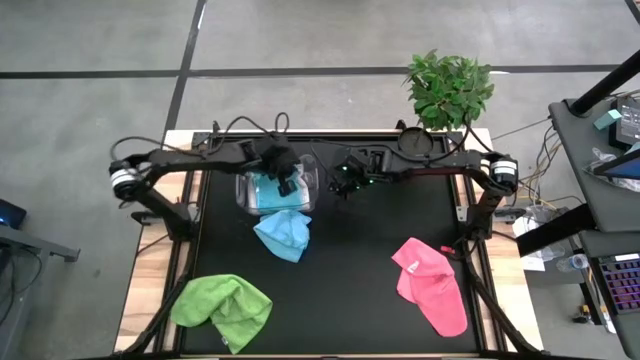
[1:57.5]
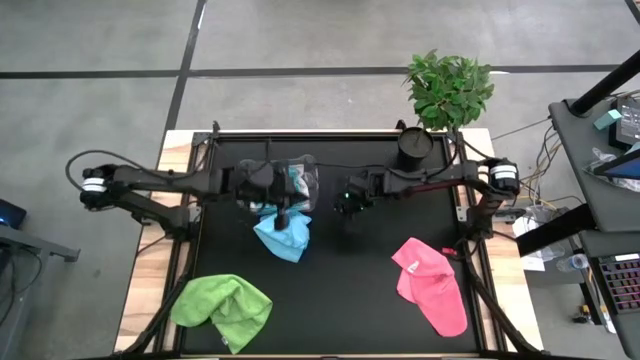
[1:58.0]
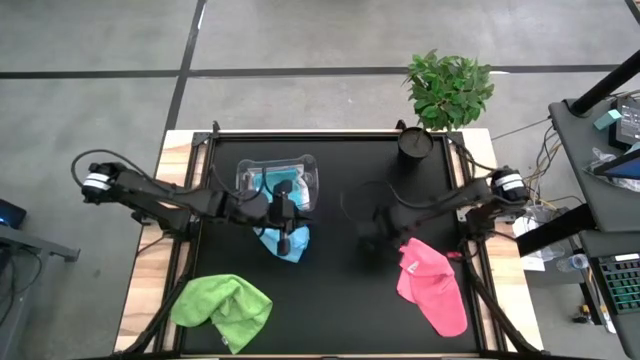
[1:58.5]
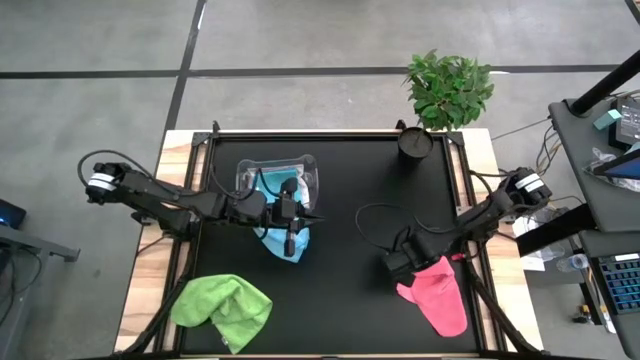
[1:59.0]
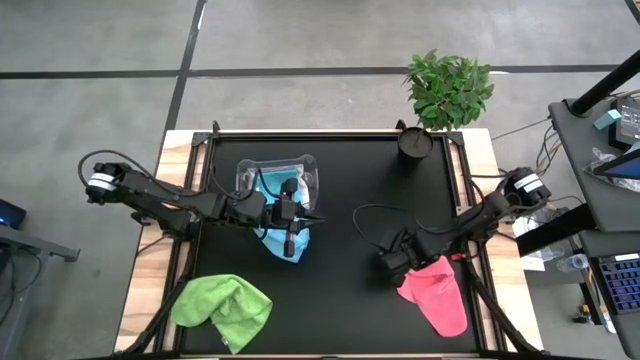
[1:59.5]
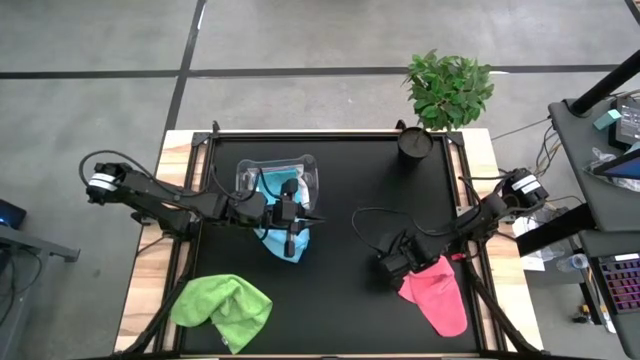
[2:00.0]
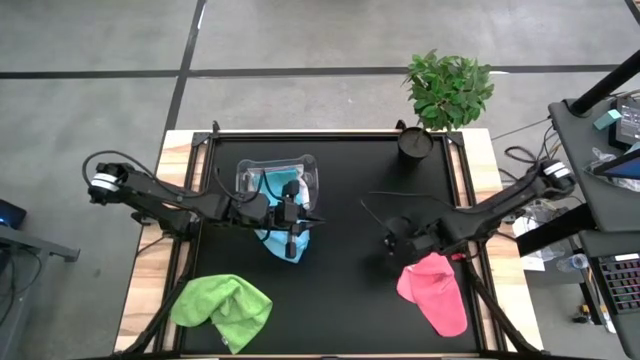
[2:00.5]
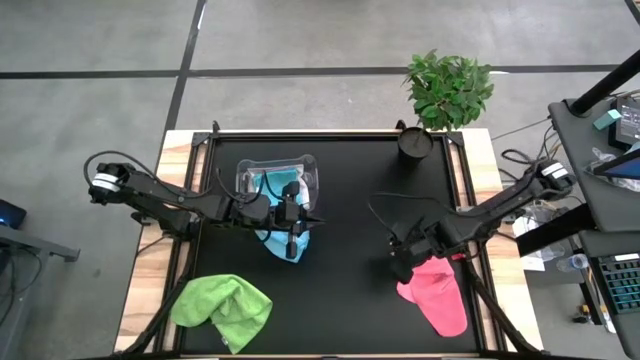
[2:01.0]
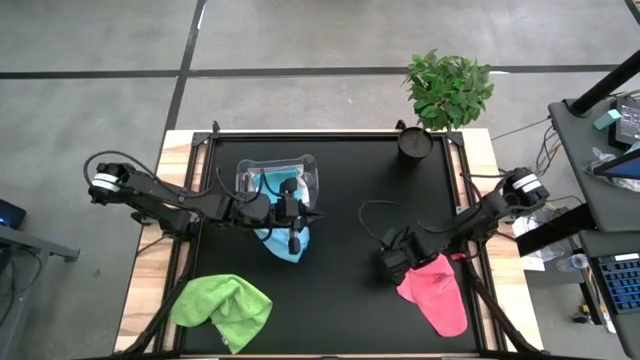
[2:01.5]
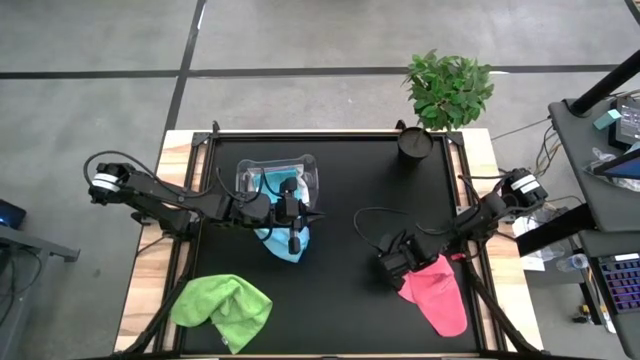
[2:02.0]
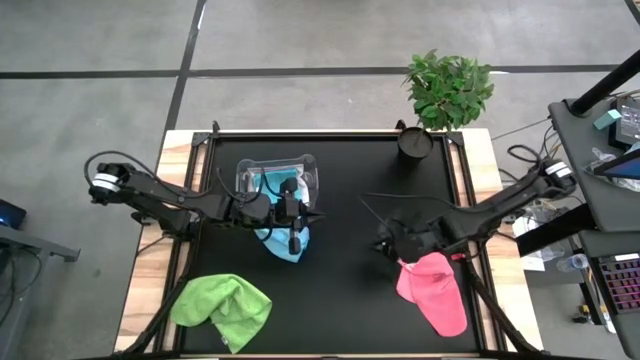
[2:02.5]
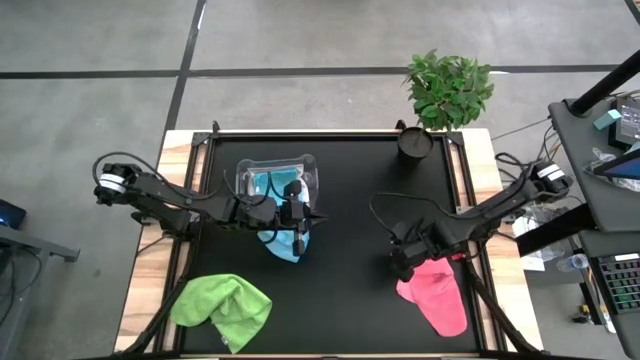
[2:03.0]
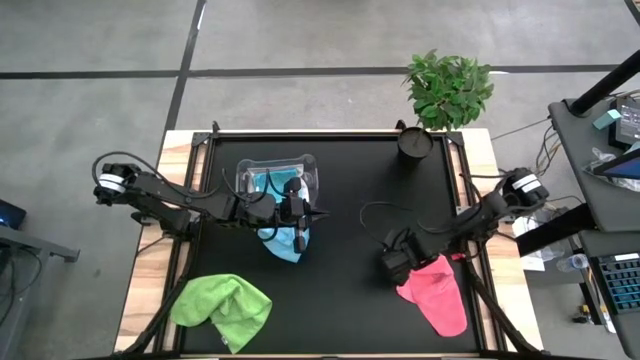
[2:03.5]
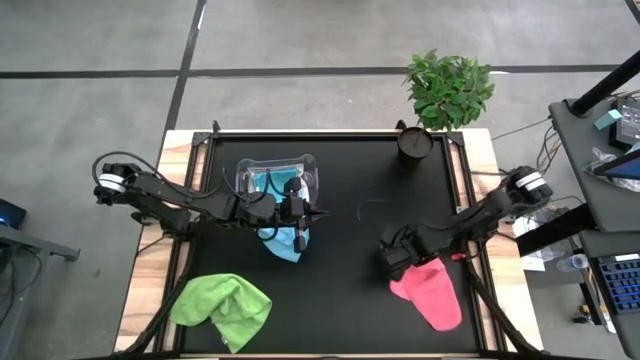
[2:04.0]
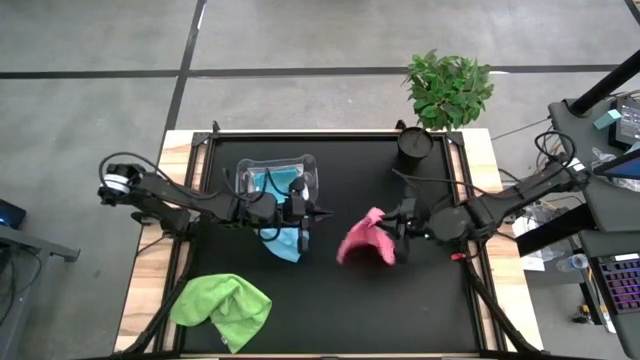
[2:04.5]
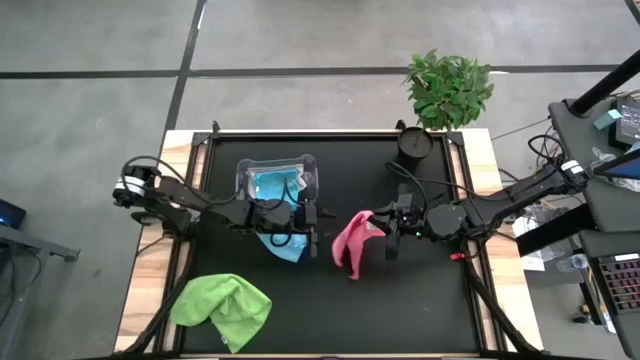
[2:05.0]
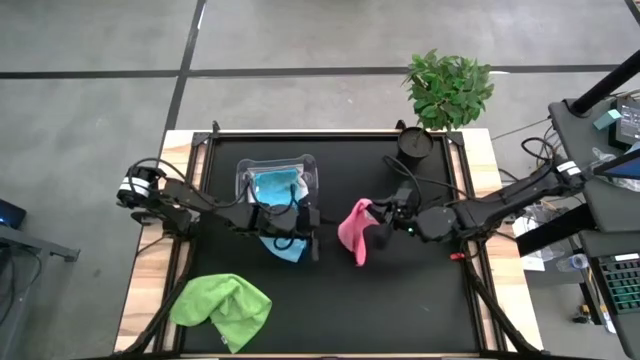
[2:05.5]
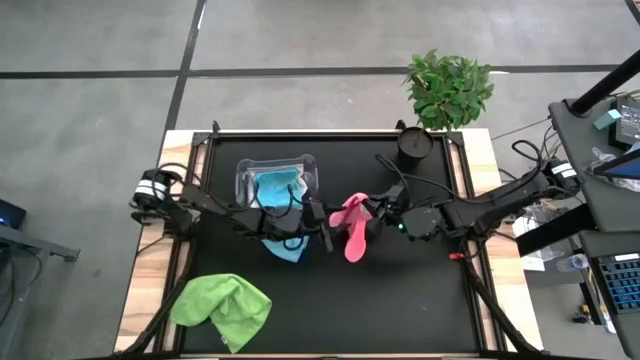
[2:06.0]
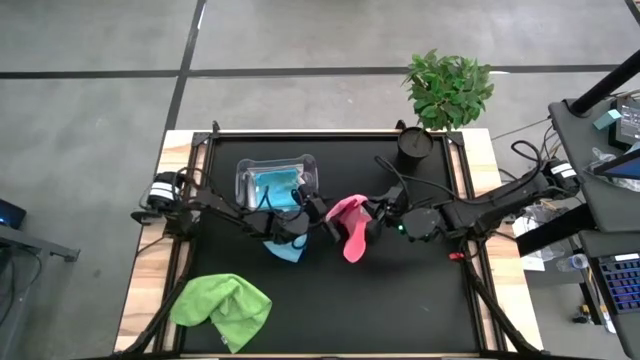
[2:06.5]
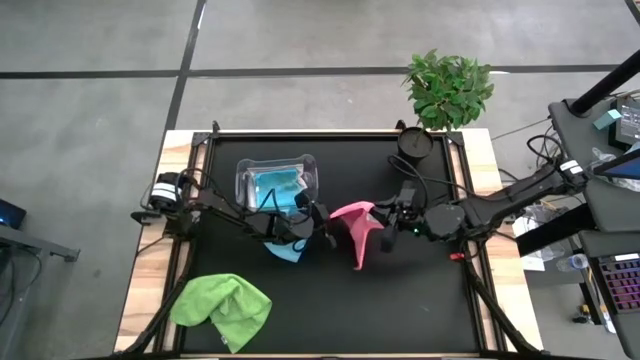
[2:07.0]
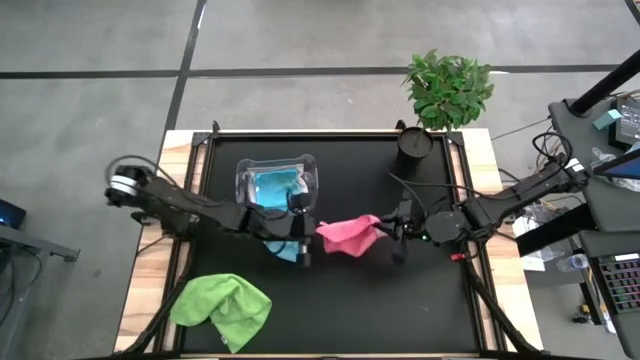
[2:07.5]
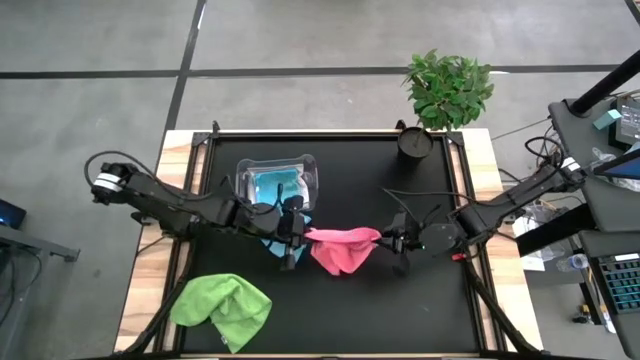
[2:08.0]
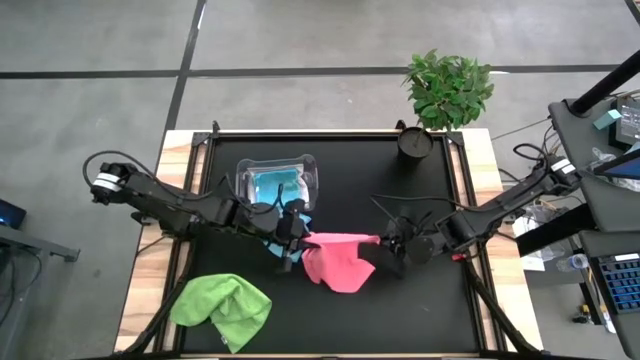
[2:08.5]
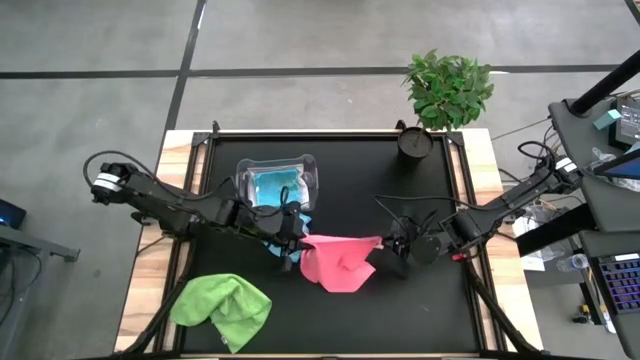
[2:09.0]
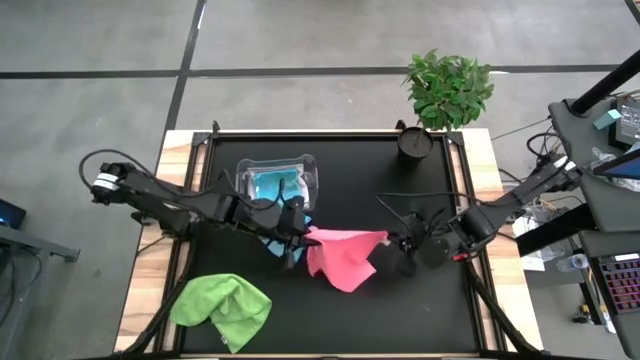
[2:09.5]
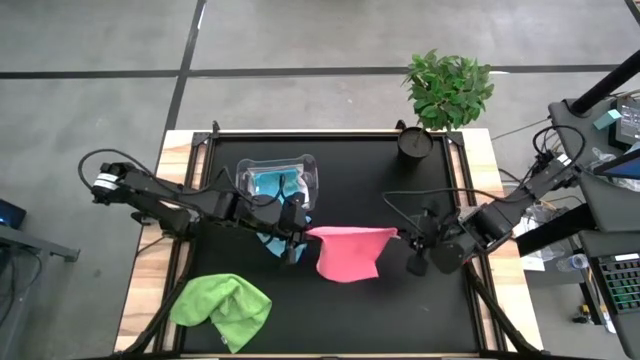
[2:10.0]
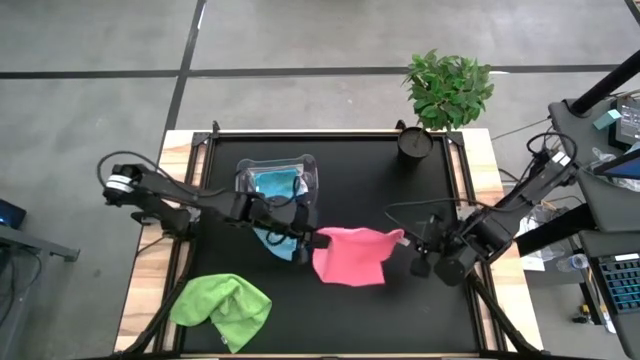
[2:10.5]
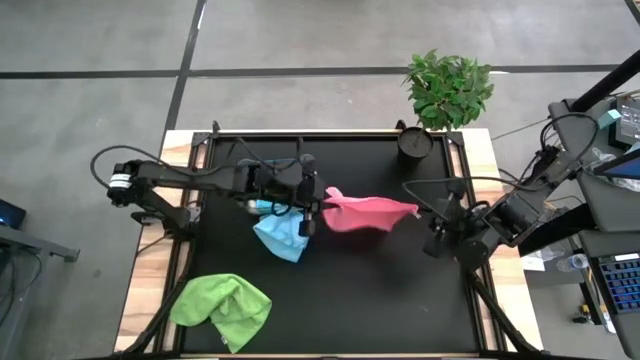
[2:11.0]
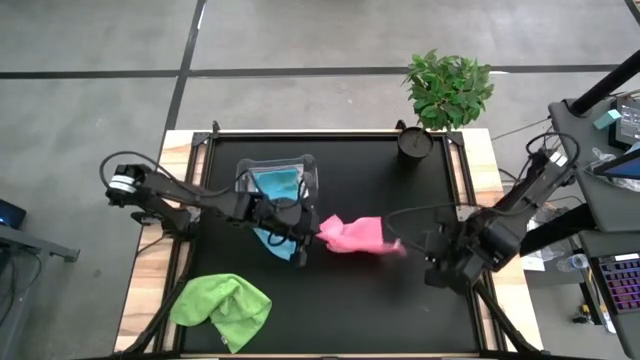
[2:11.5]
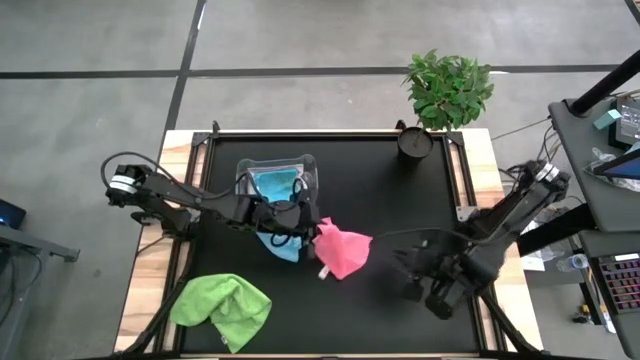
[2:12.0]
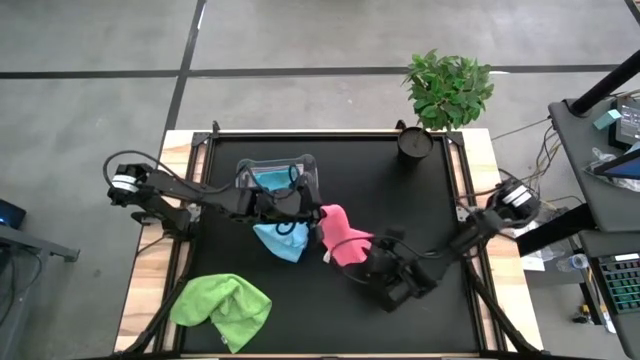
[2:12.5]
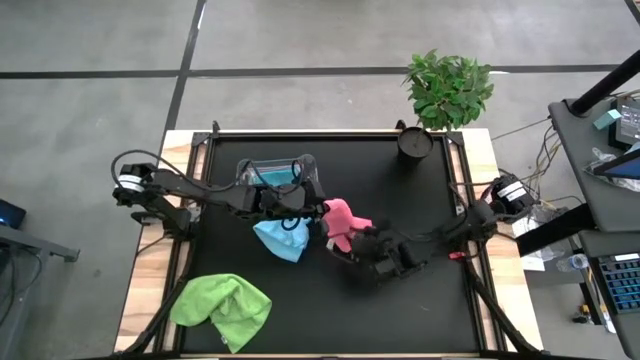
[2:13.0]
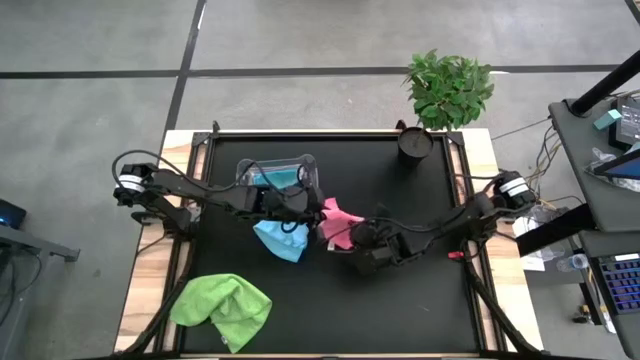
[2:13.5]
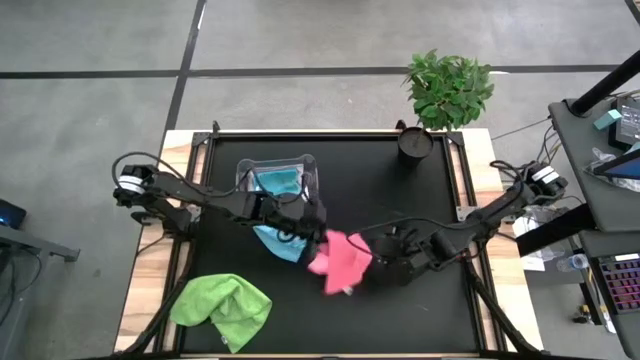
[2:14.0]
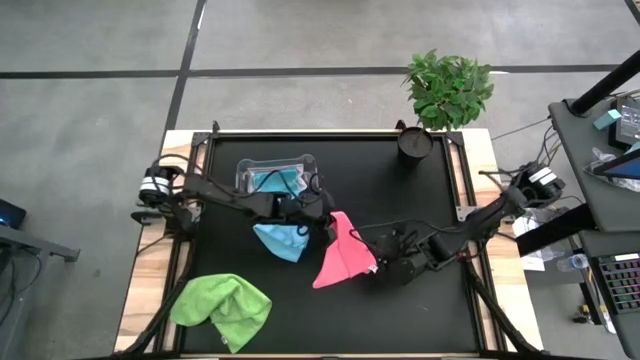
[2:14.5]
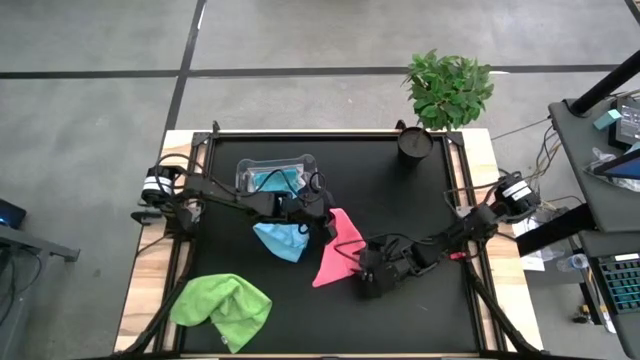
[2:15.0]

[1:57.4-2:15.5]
Task: Fold microfiber towels
Fold the pink microfiber cloth

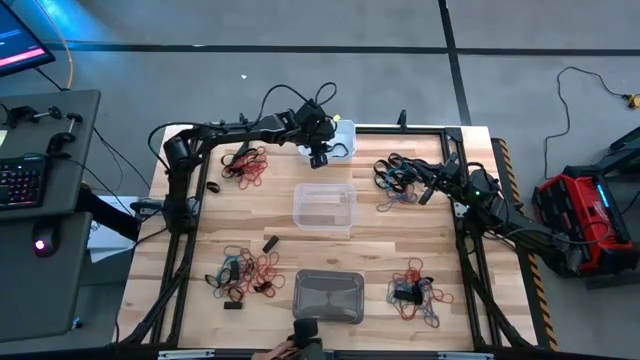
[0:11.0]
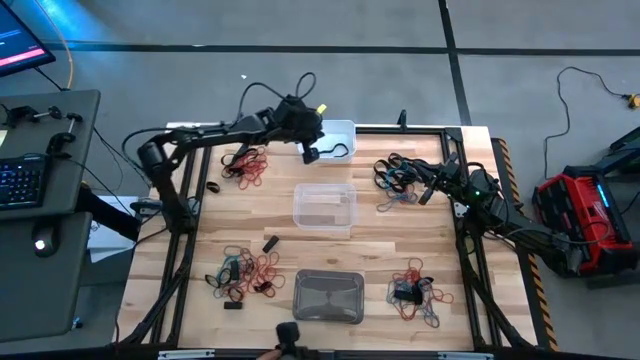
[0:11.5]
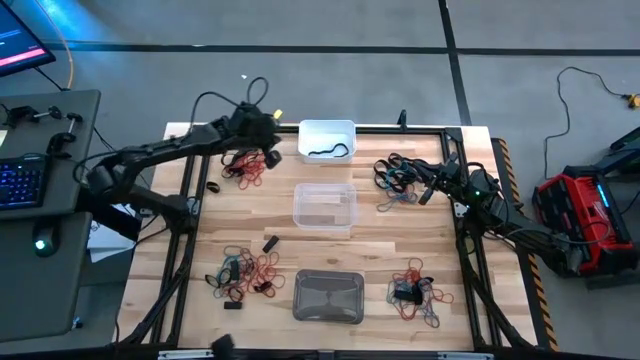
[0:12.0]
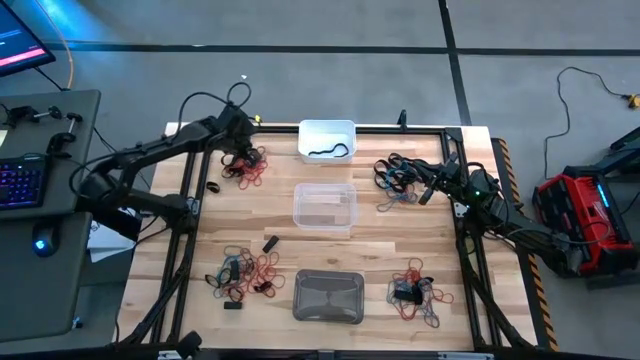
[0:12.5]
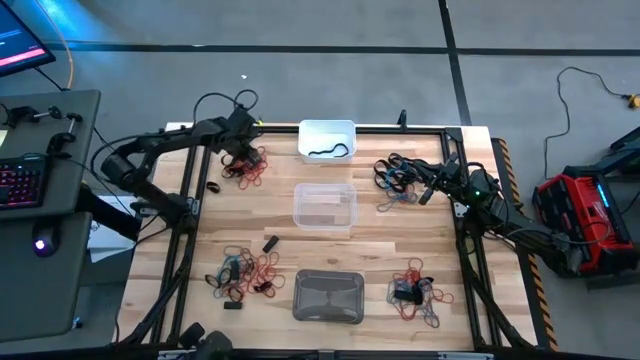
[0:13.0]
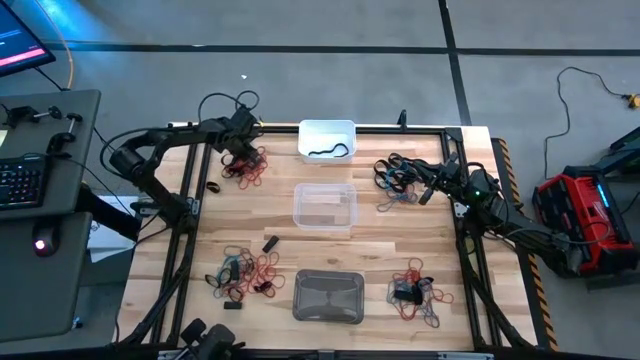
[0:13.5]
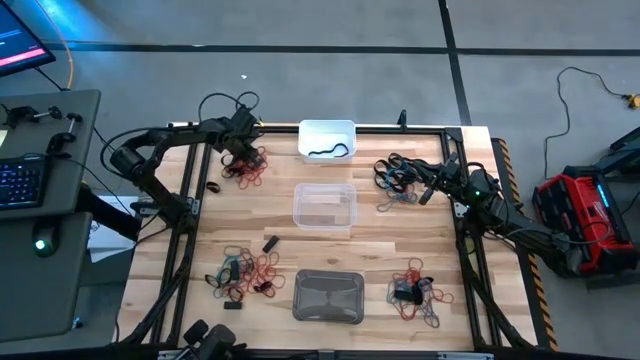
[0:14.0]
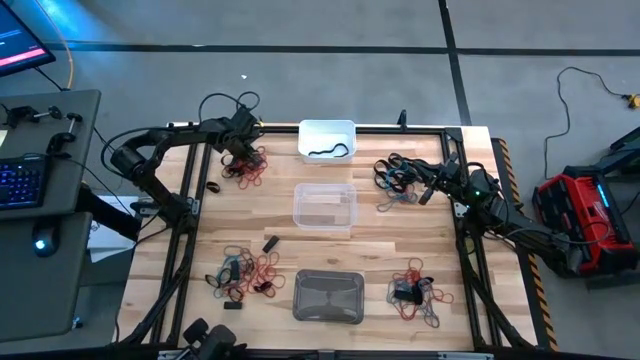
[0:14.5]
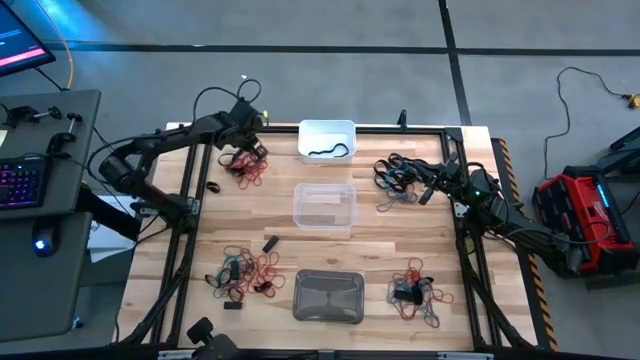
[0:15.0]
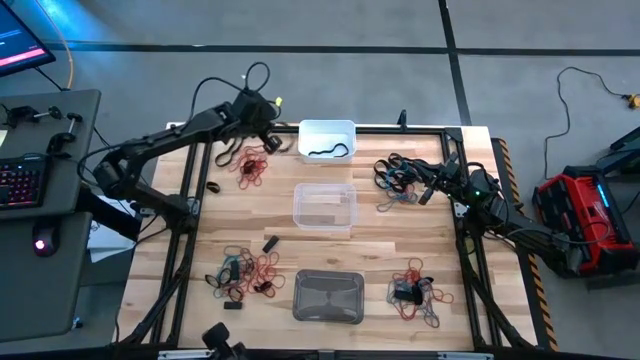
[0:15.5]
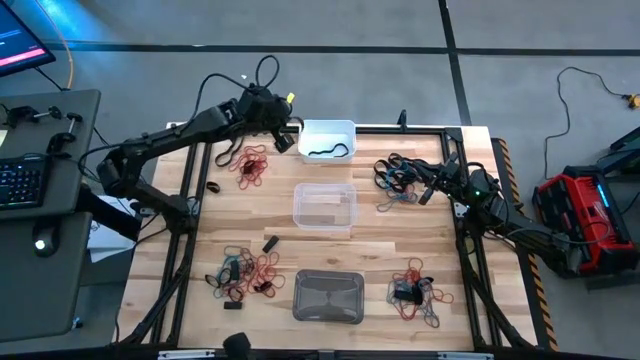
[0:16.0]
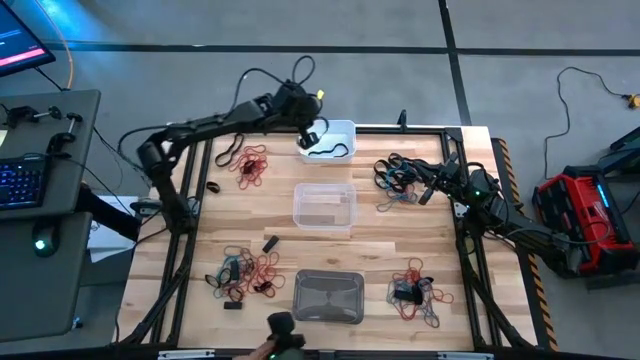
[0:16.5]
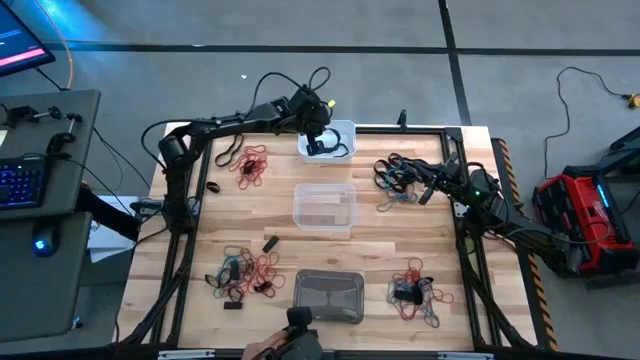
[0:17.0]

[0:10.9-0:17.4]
Task: Sort rubber bands into baskets
Put the black rubber band into the white bin
